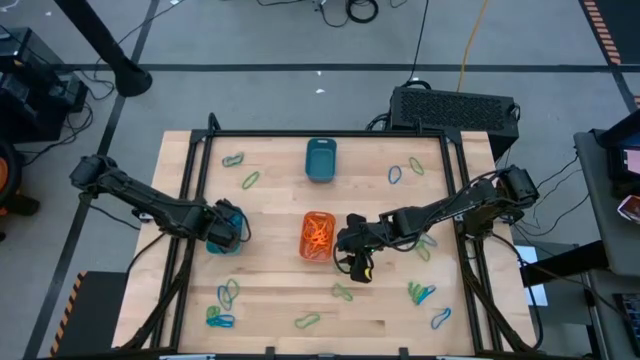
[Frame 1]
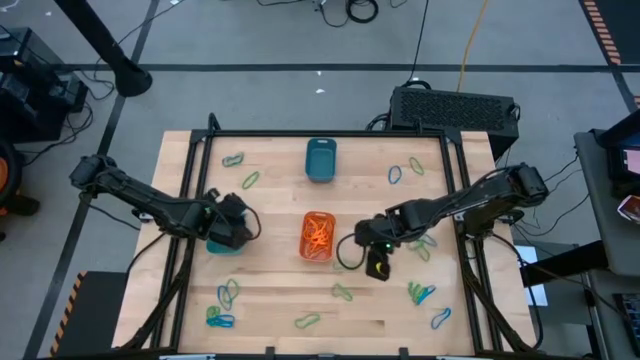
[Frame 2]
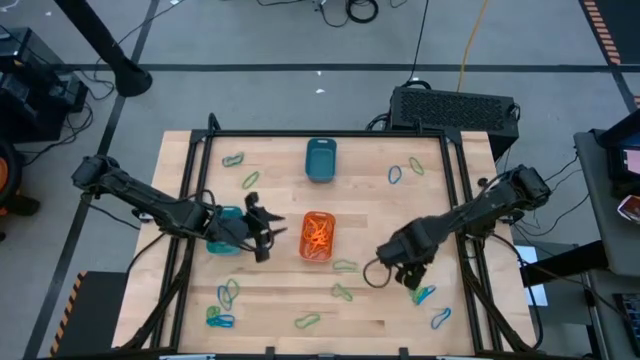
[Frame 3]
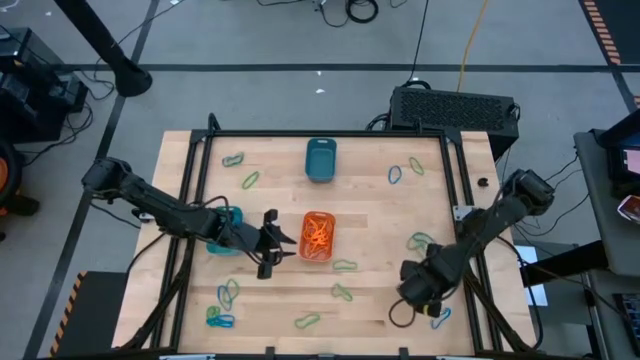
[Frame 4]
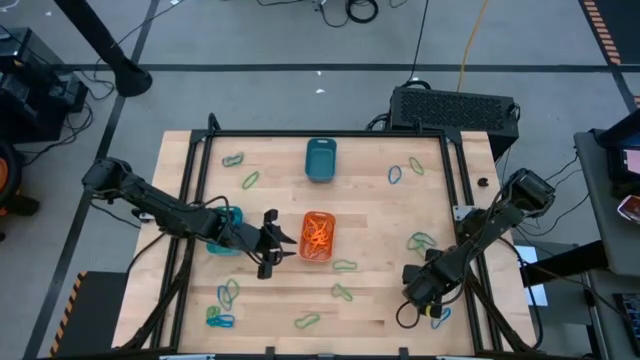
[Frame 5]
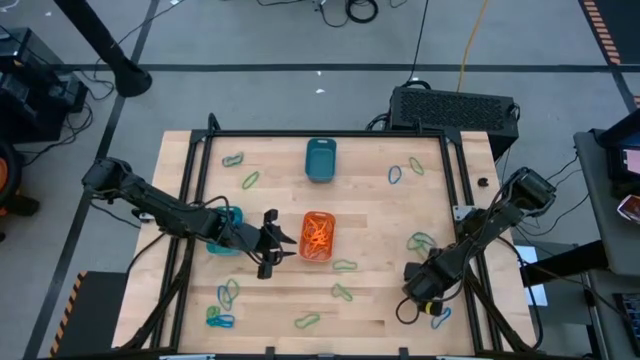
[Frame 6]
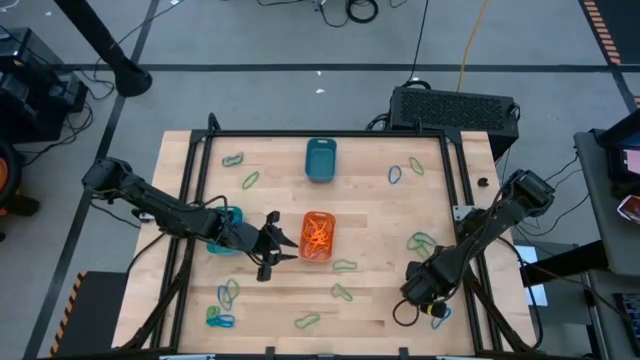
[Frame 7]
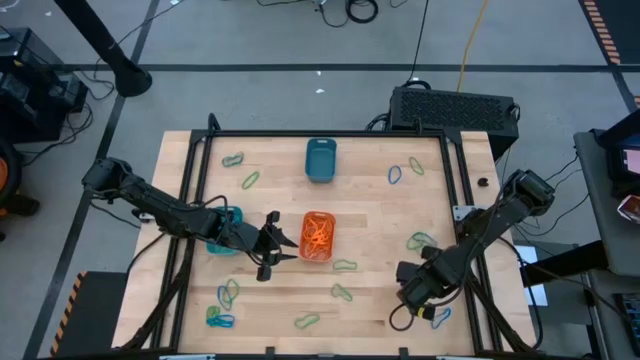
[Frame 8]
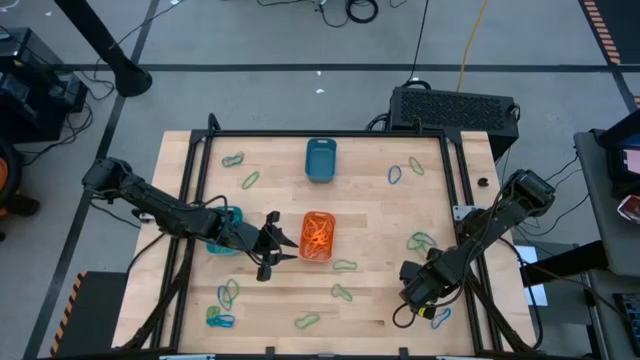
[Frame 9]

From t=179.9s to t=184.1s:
Task: Sort rubber bands into baskets
Put the blue rubber band into the green bin

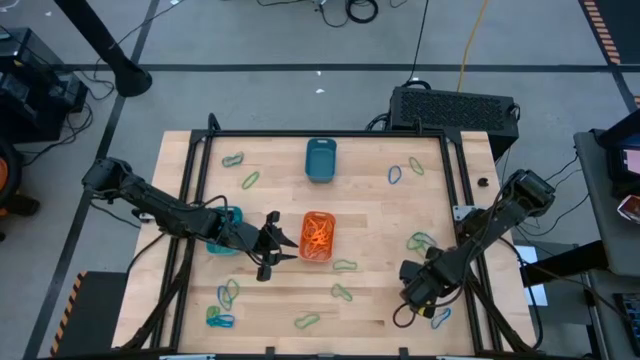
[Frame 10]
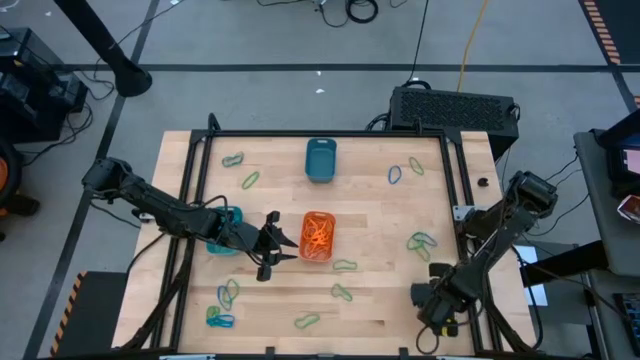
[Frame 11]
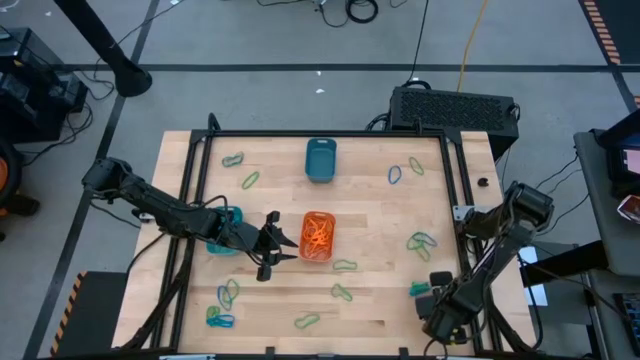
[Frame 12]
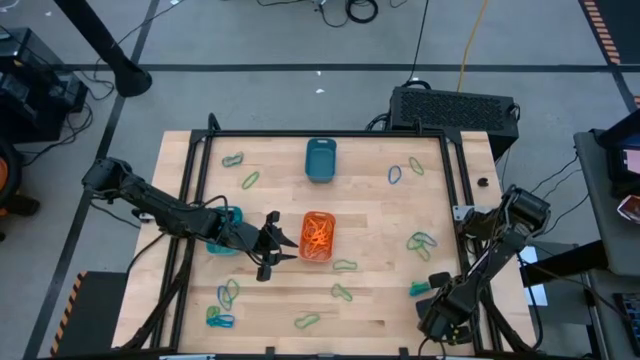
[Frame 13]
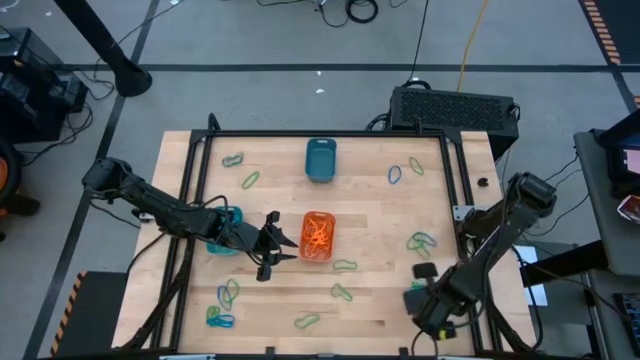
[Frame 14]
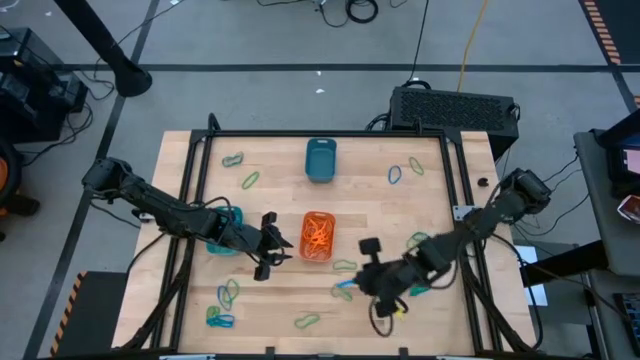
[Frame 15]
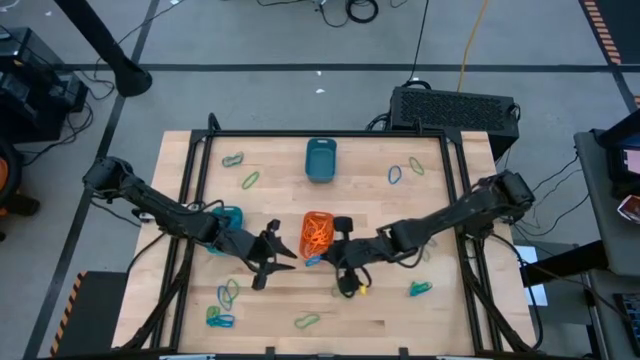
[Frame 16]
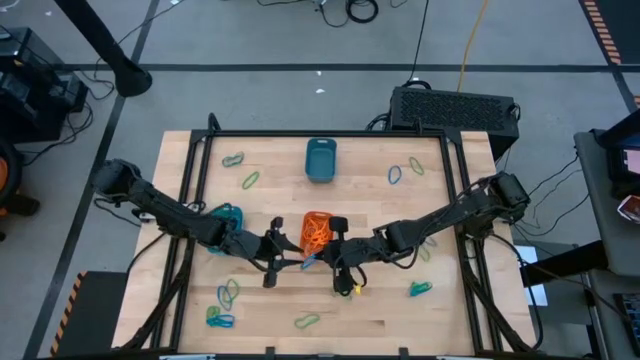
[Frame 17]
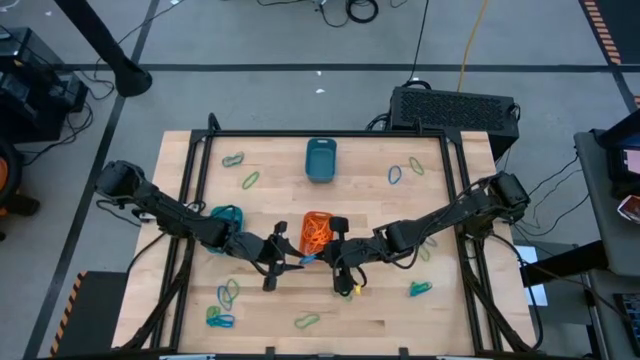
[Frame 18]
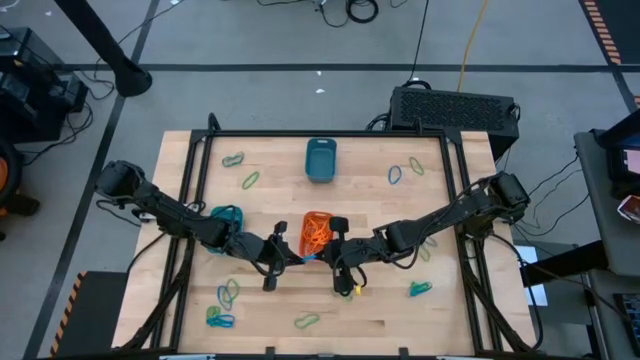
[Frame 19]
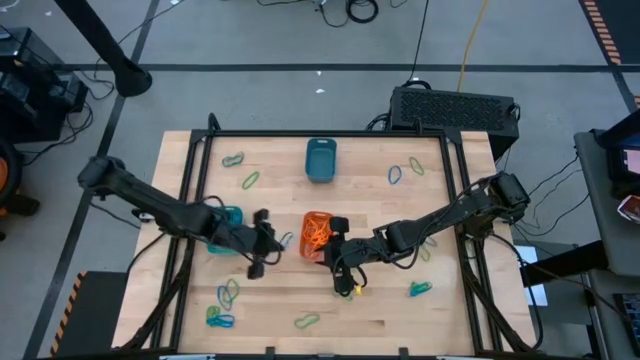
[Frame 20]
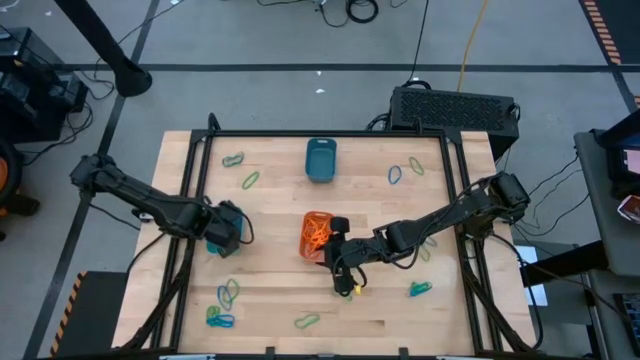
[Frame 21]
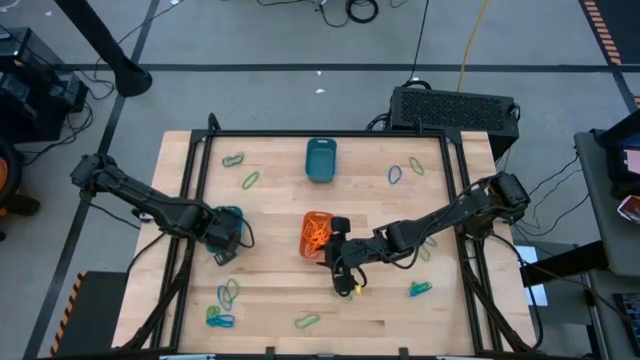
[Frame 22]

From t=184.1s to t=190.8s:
Put the blue rubber band into the green bin

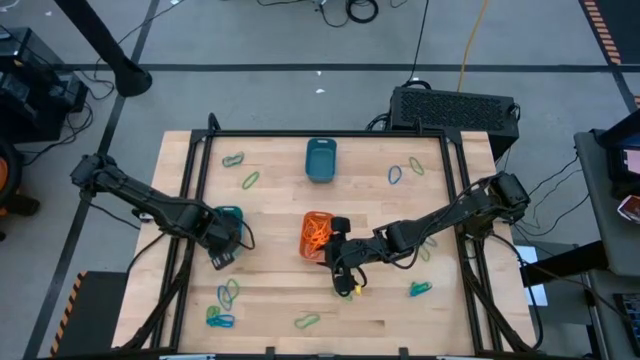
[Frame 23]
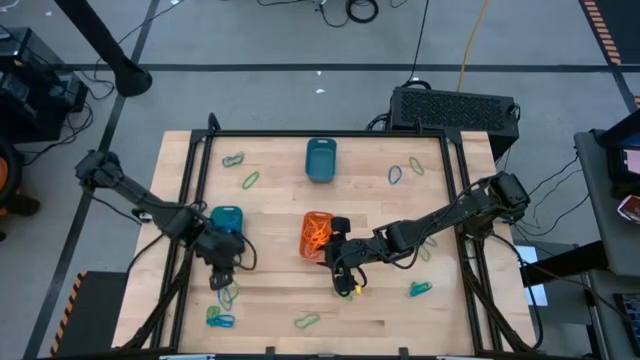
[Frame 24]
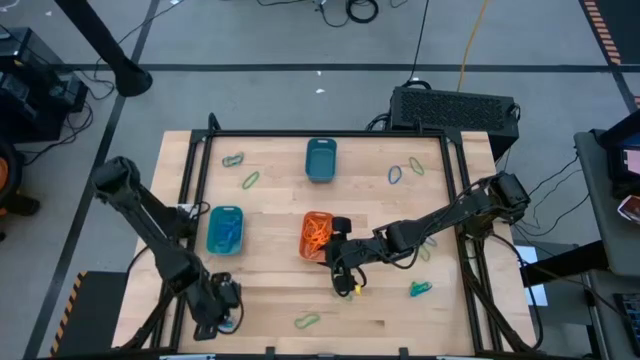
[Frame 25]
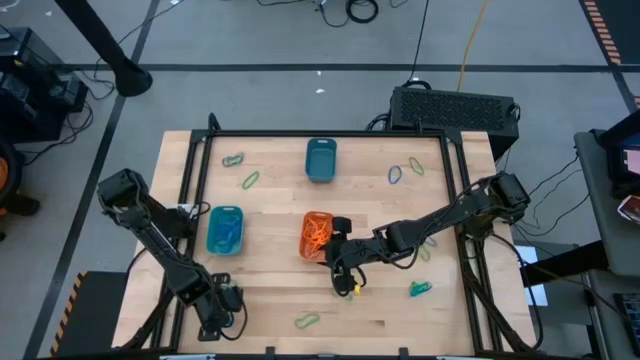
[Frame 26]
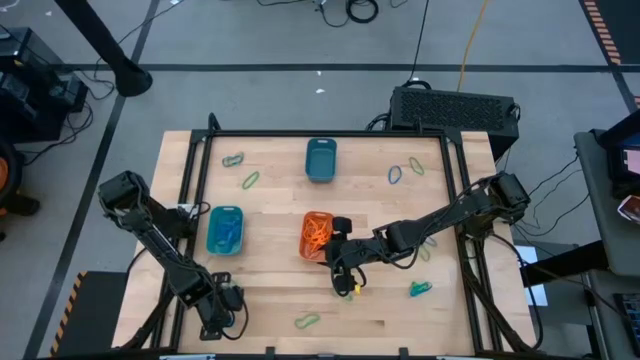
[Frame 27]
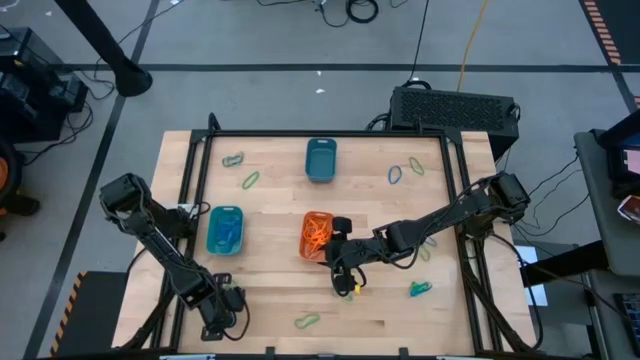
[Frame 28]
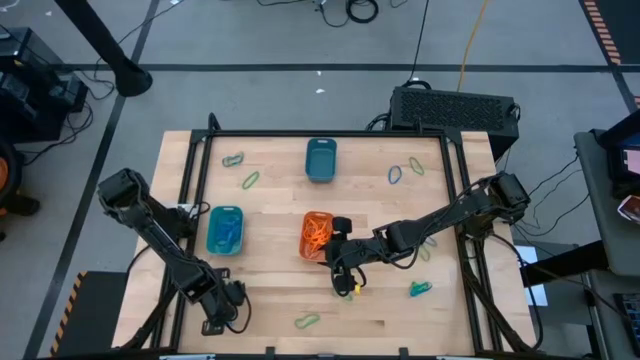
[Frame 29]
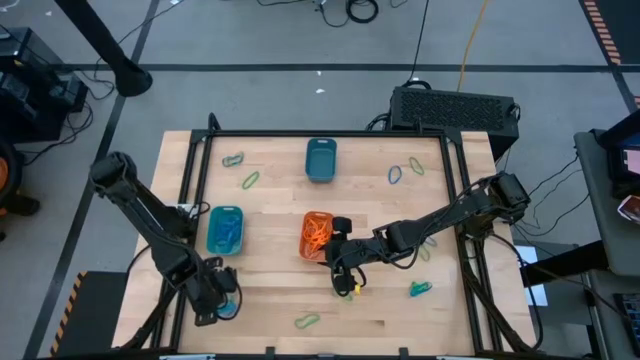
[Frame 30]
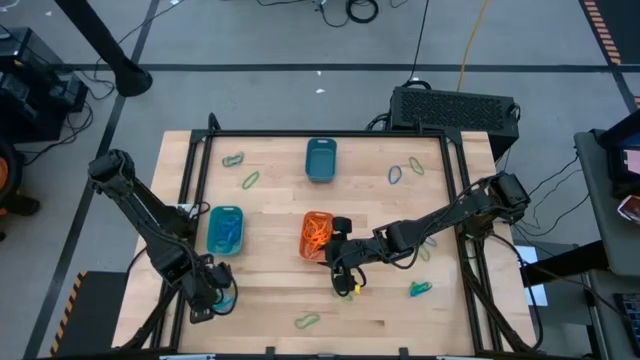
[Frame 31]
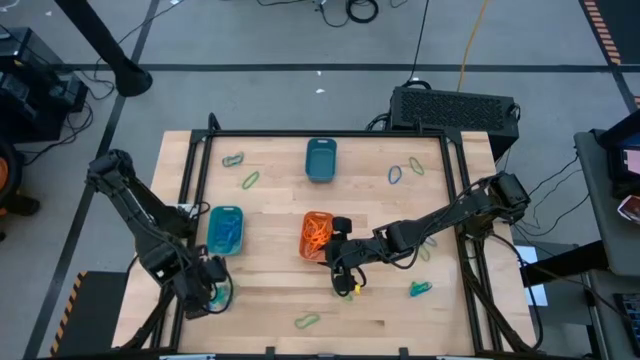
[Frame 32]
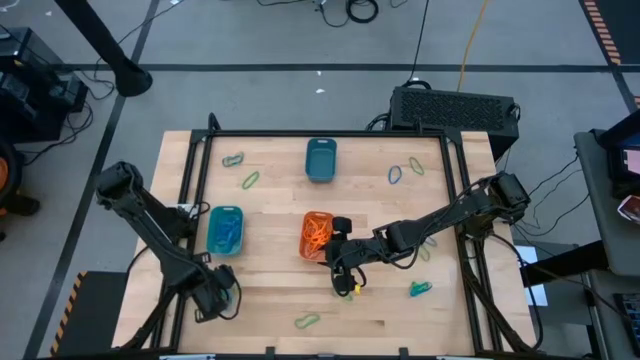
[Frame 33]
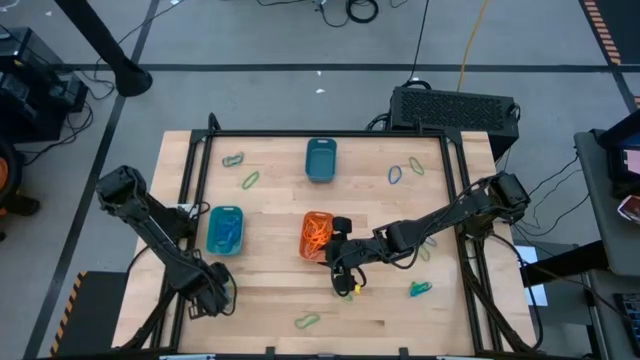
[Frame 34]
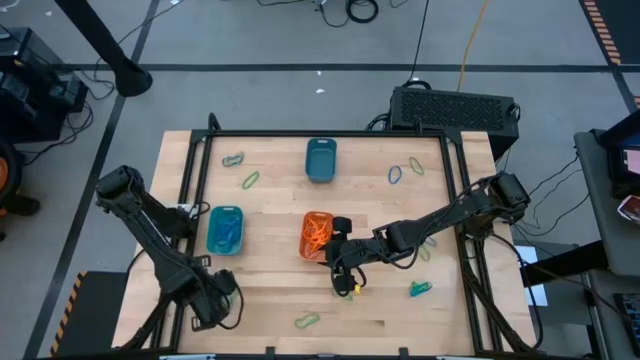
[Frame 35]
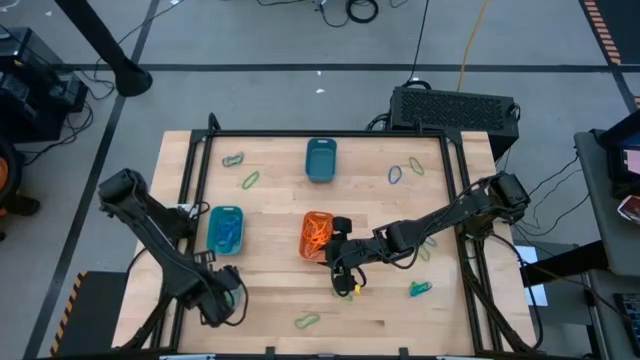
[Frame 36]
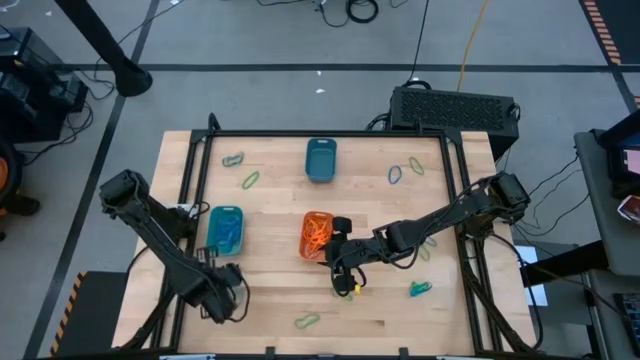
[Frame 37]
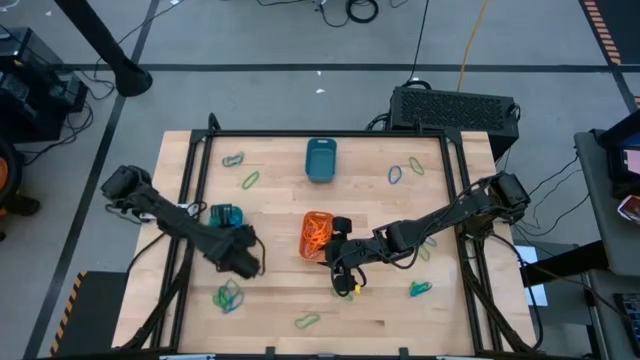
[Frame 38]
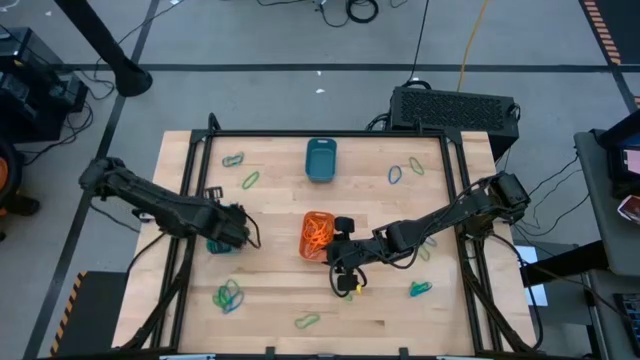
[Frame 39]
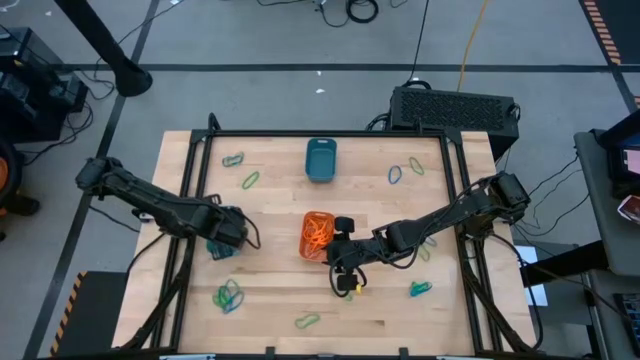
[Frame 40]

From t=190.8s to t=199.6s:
Put the blue rubber band into the green bin
